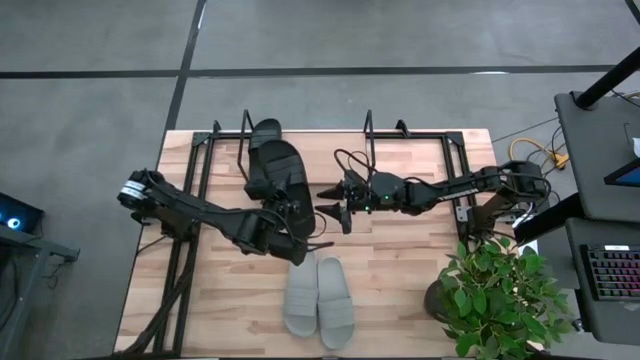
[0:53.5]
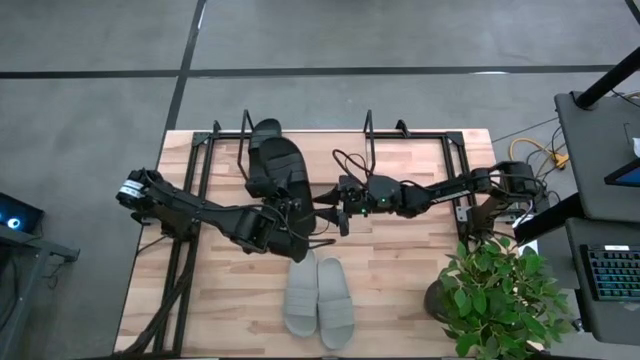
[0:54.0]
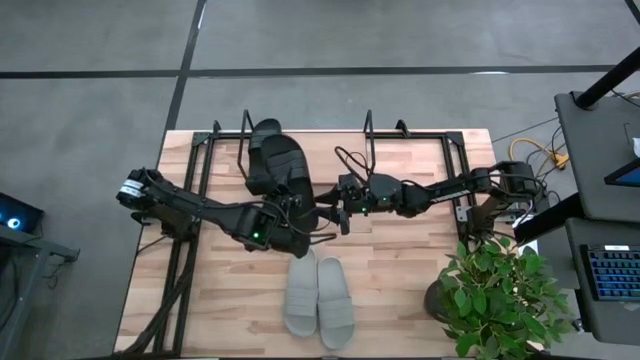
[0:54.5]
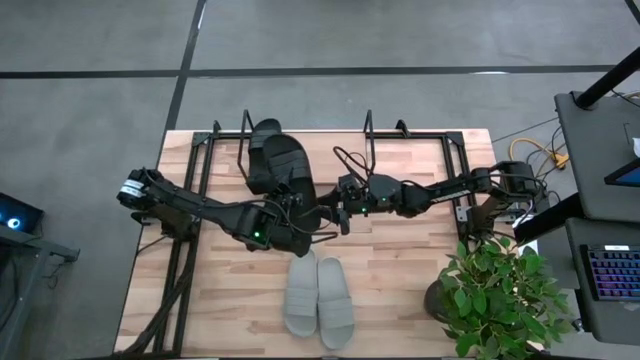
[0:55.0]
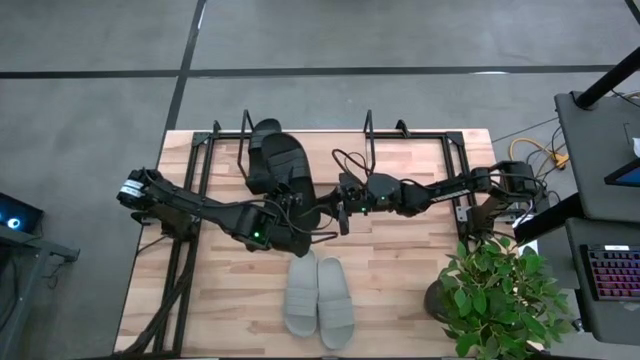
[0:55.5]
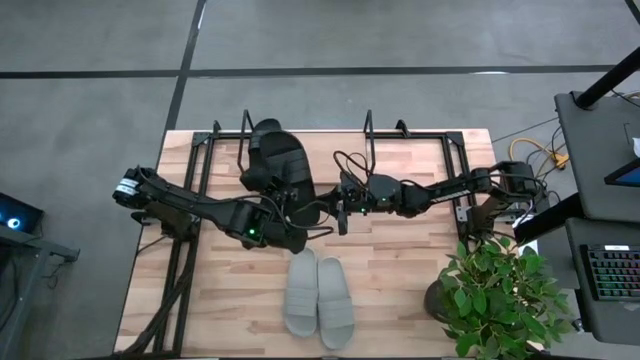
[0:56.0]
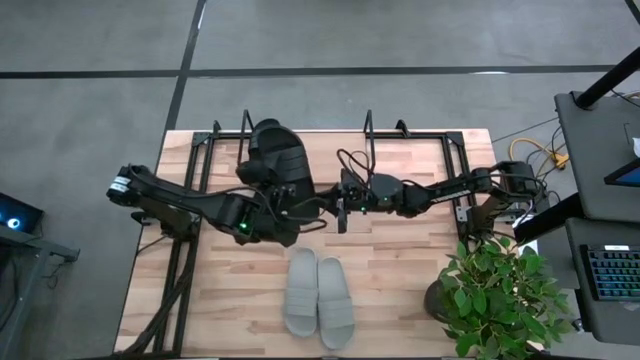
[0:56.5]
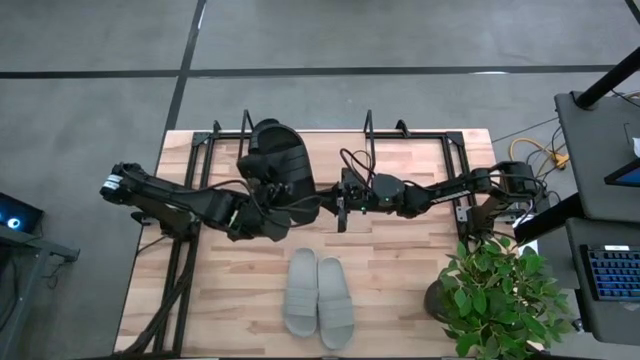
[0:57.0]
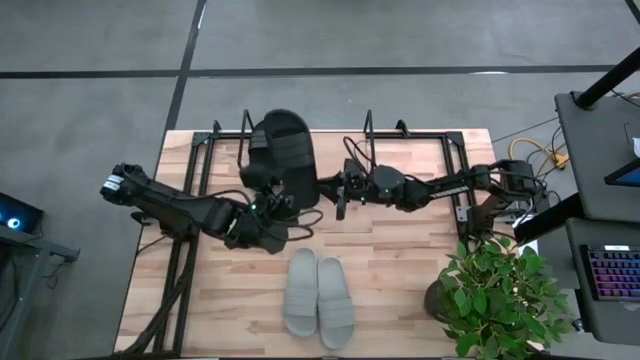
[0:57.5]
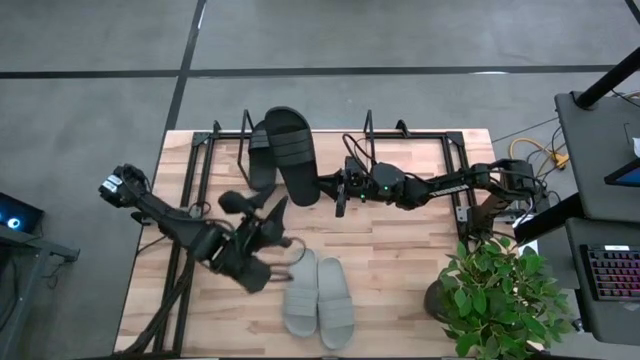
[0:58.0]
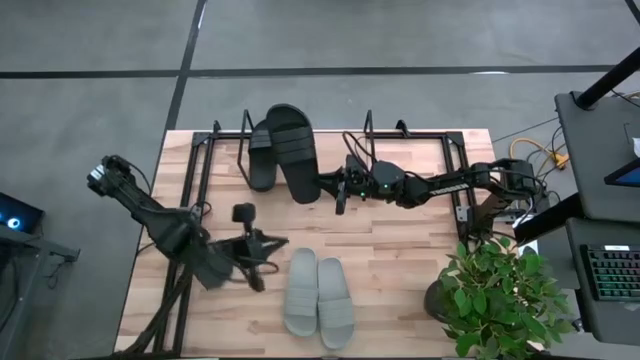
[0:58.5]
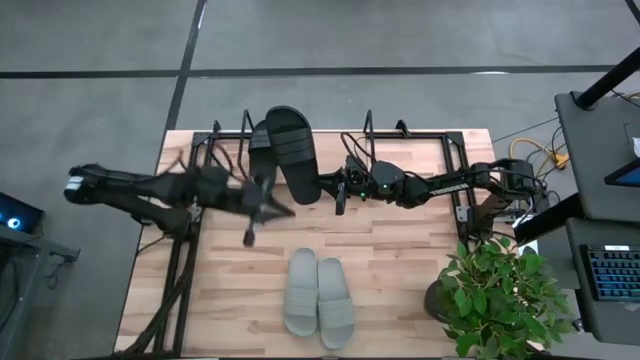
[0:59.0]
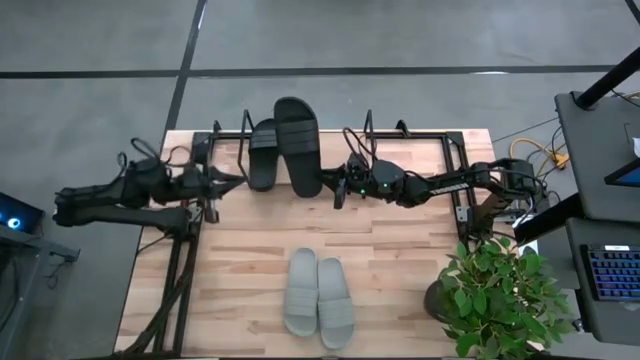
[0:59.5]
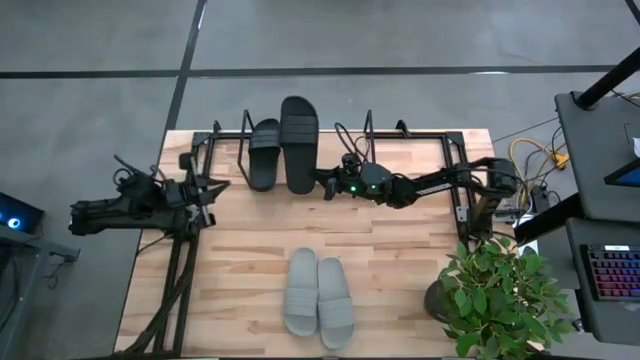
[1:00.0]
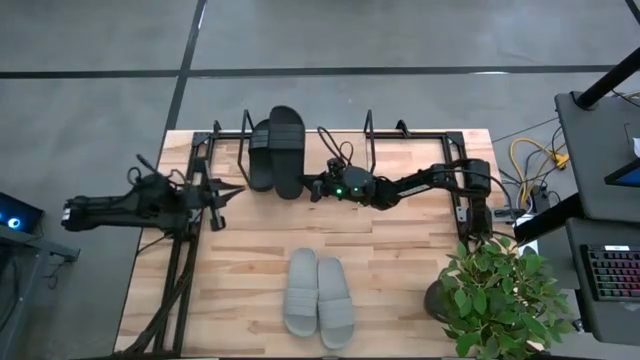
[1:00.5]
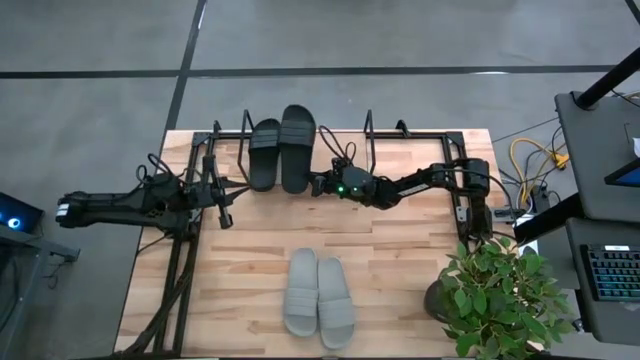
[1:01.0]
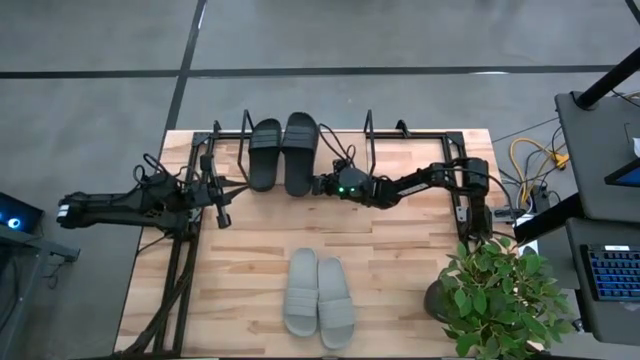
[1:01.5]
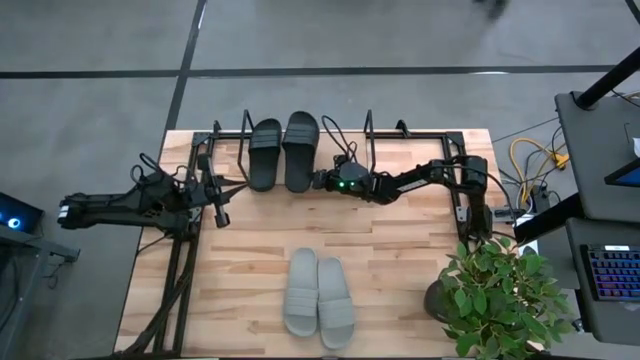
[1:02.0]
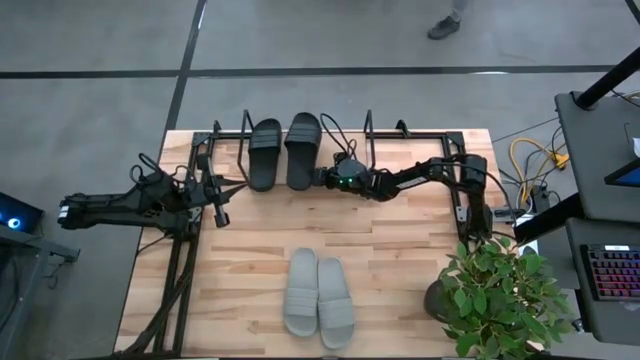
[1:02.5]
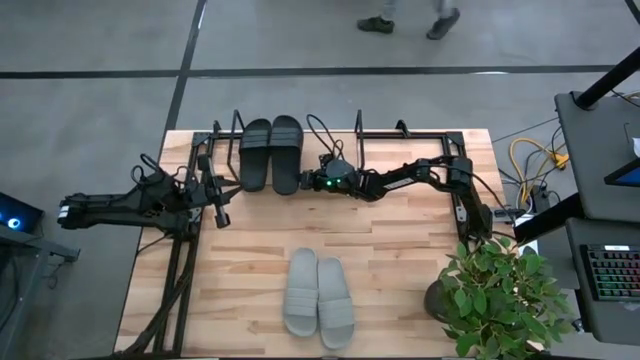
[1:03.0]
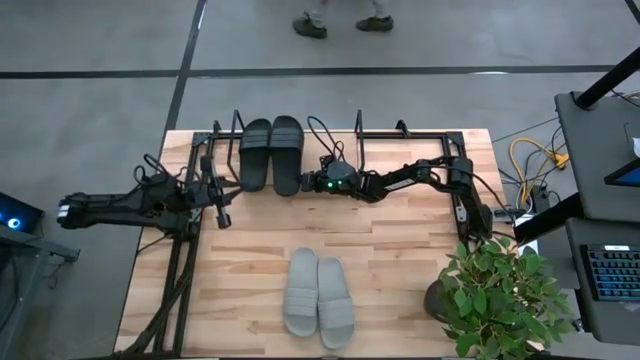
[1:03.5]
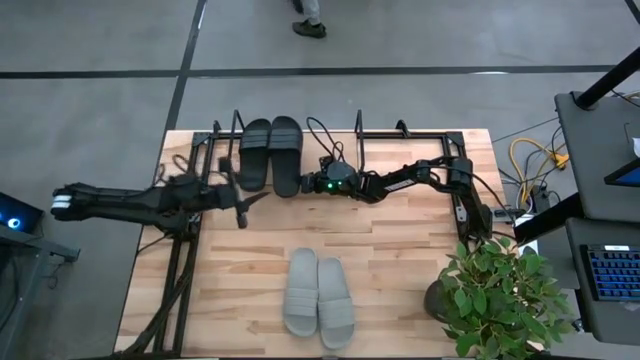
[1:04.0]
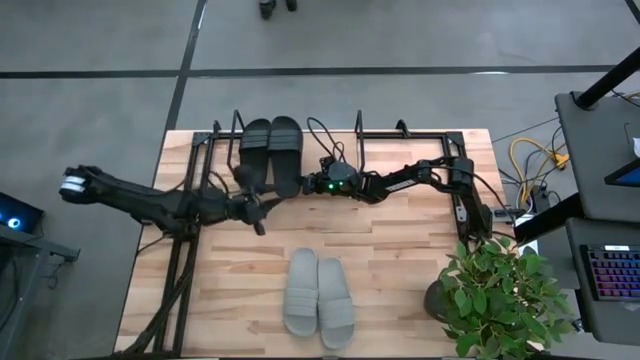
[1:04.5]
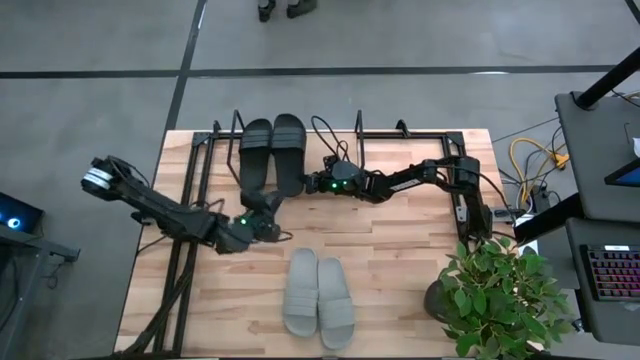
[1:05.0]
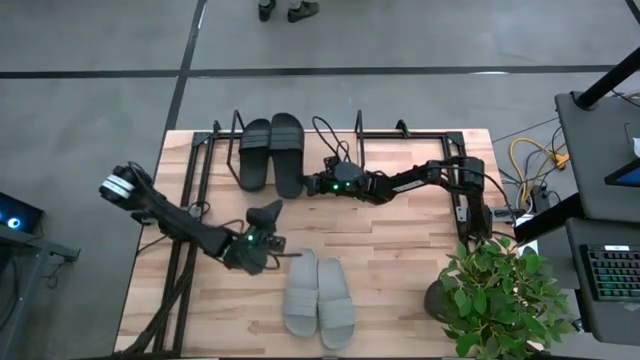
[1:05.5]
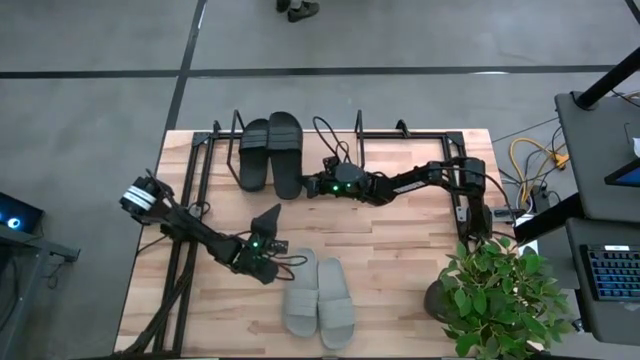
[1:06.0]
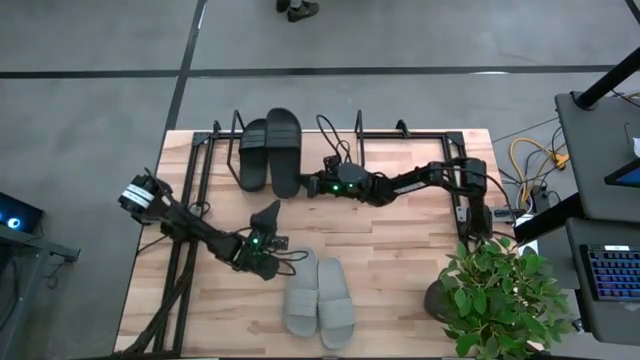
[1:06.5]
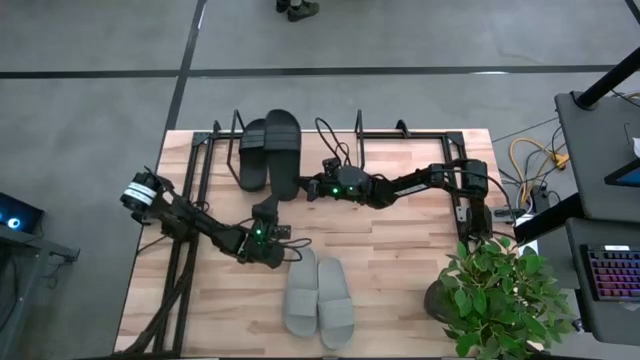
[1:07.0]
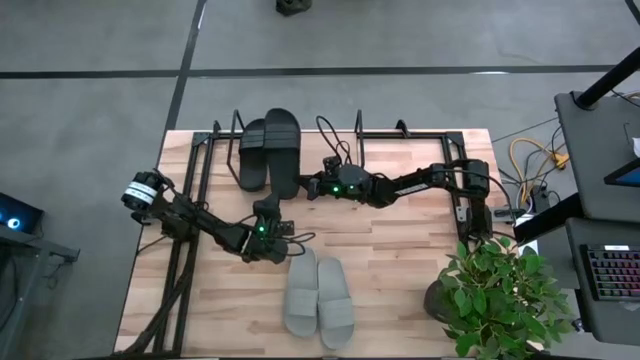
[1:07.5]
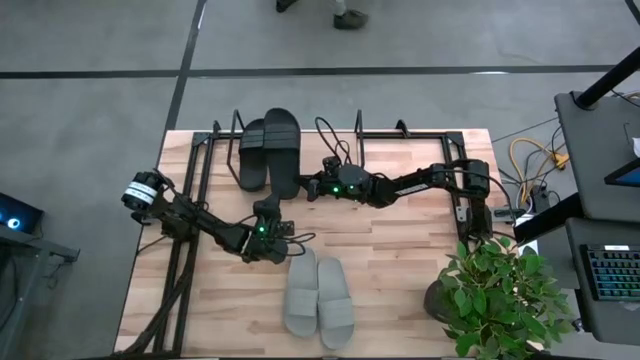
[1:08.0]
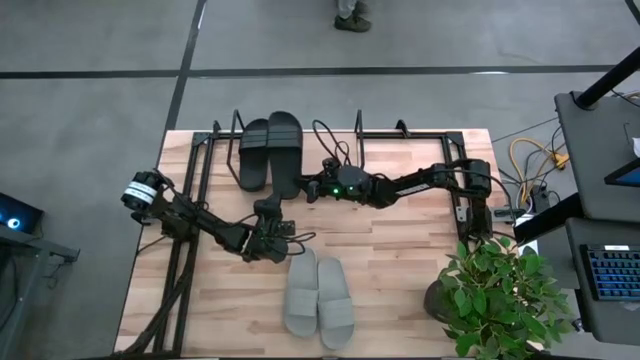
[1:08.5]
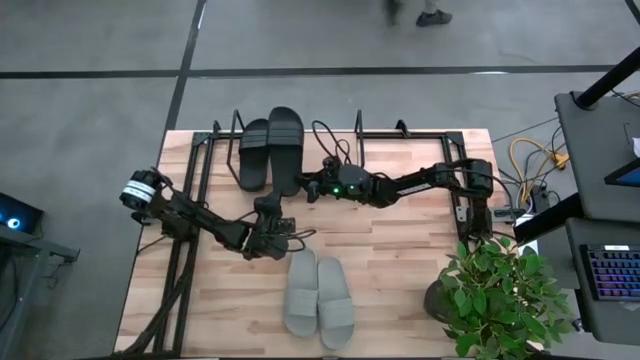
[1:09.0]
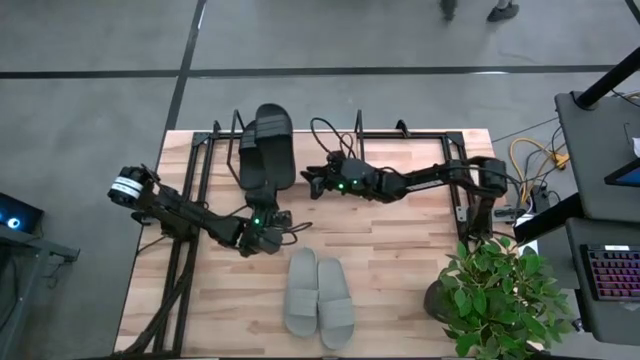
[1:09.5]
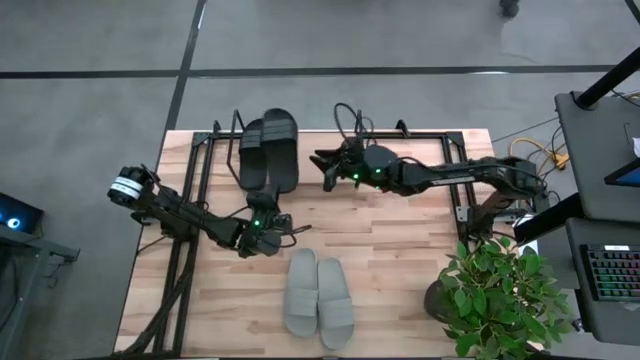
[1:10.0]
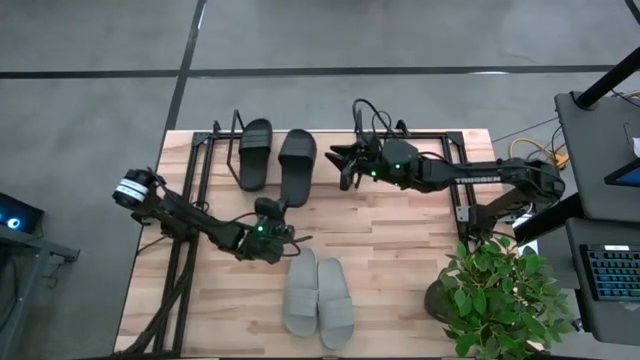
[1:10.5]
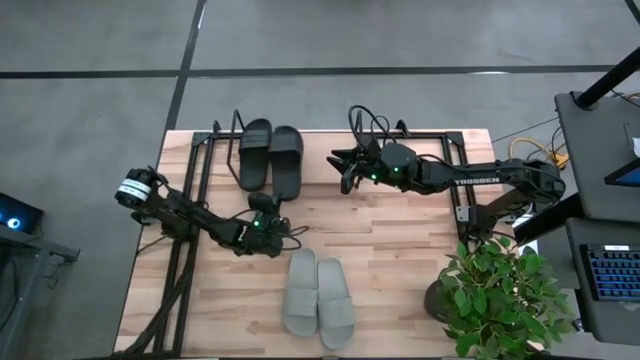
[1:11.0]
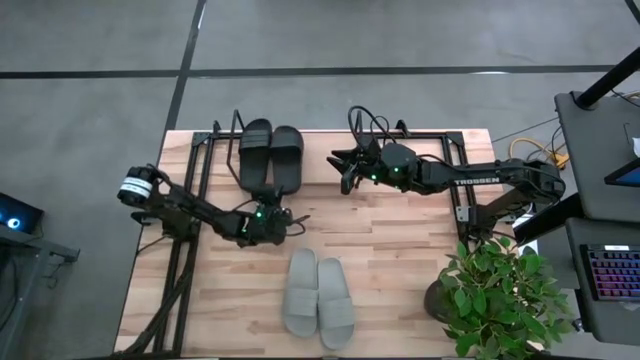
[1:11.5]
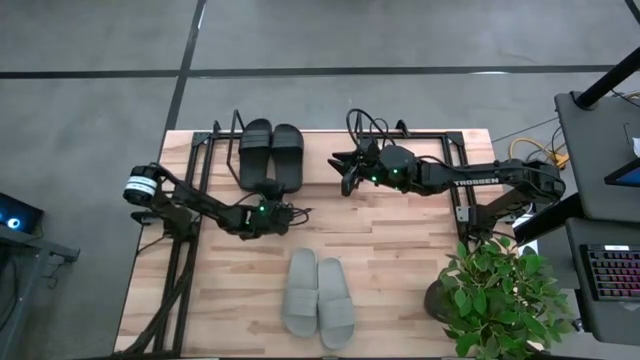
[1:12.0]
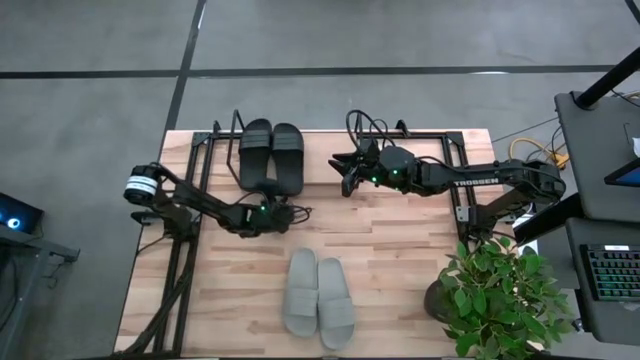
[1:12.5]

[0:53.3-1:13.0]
Task: Pick and place slides into the shelf
Put the black slide on the shelf

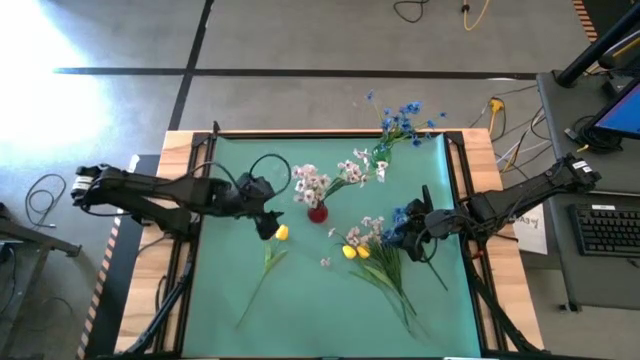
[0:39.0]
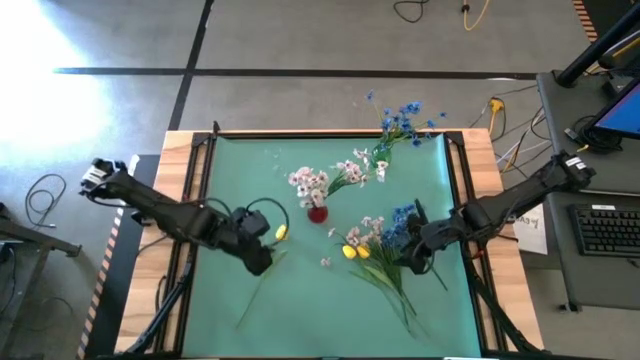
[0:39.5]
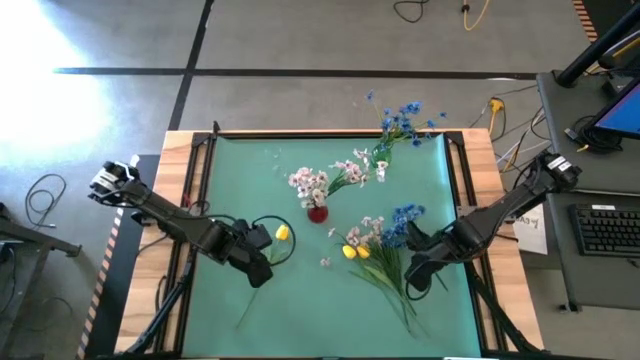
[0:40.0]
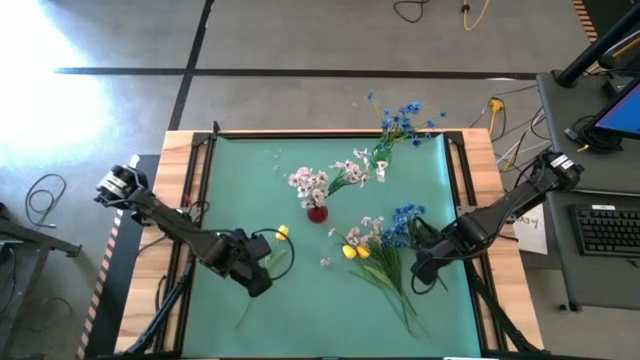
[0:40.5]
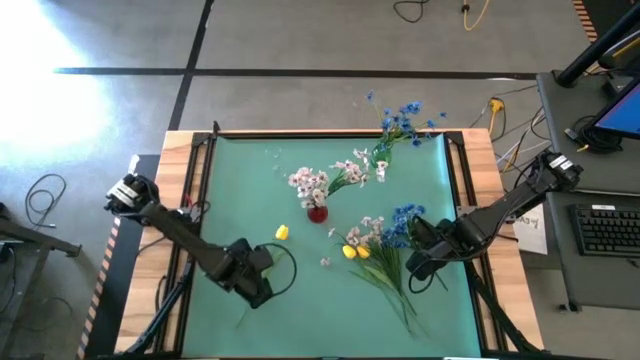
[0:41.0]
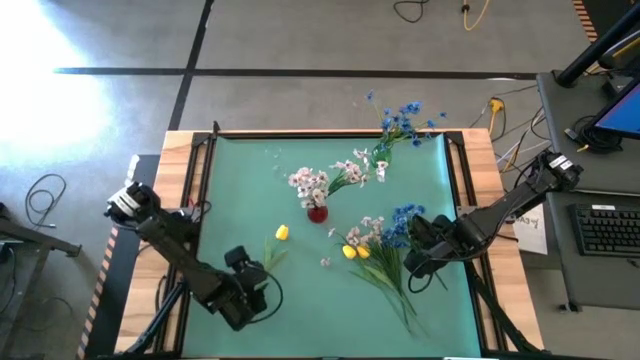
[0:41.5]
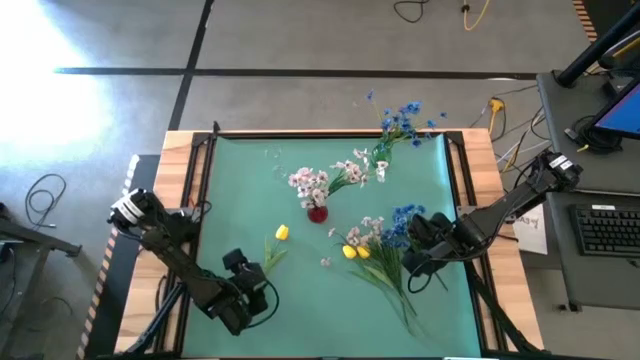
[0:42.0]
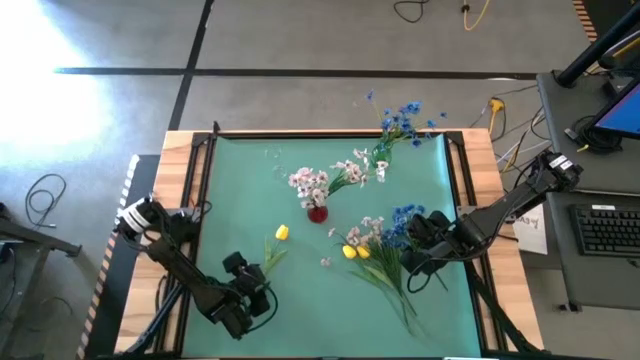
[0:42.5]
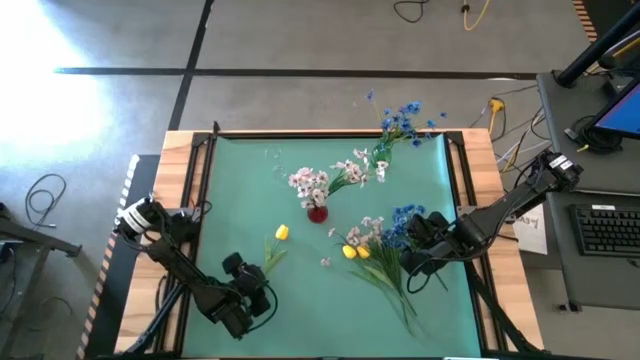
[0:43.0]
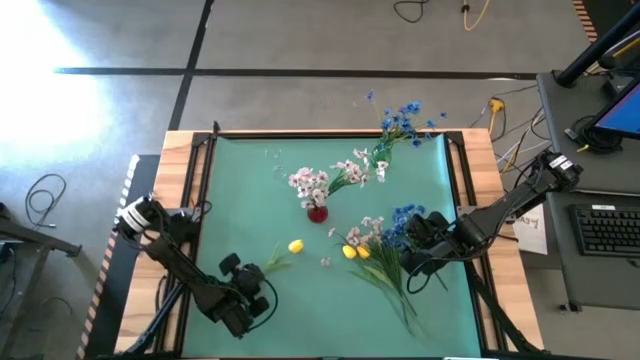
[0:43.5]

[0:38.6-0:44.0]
Task: Sort flowers into vase by color
Put the yellow tulip into the transparent vase
